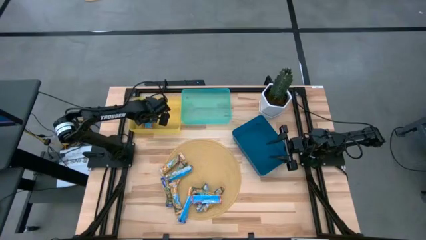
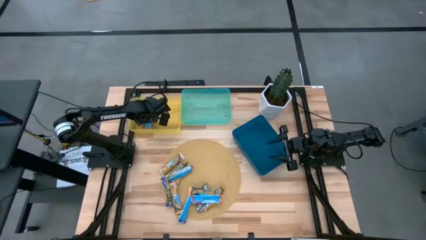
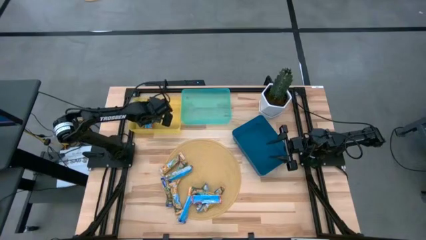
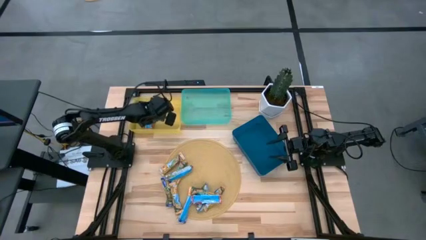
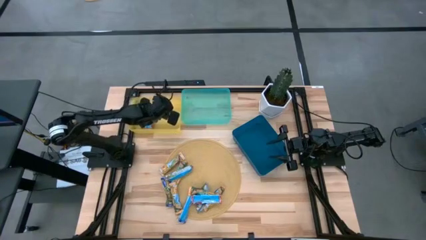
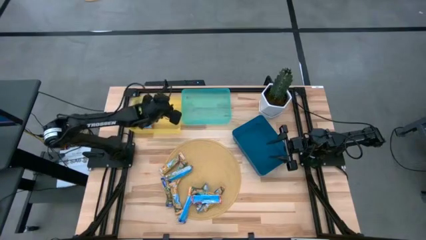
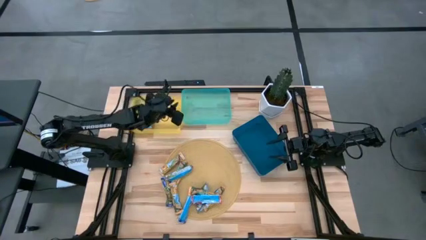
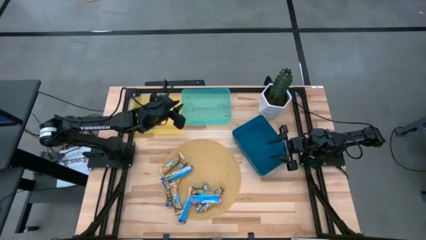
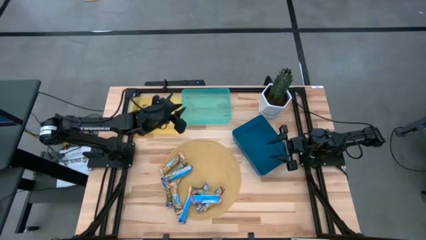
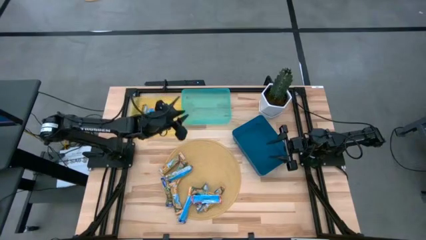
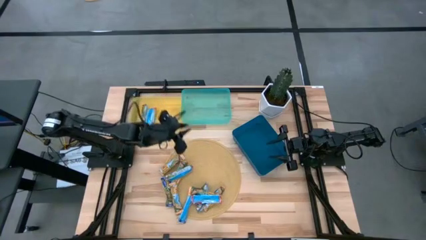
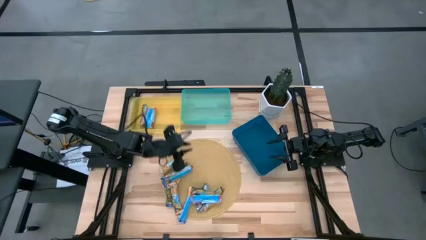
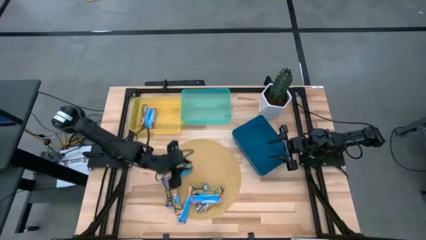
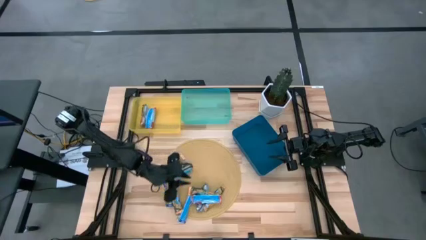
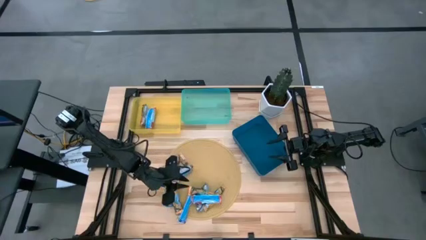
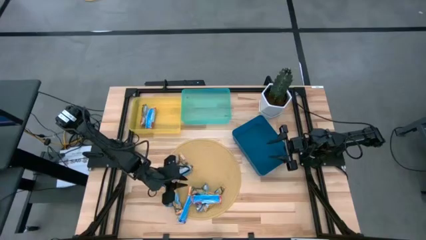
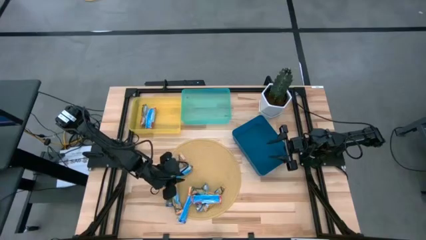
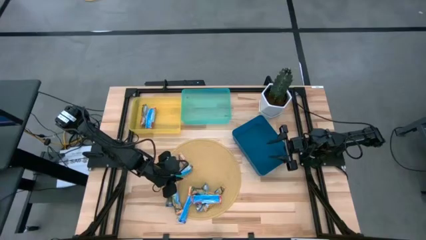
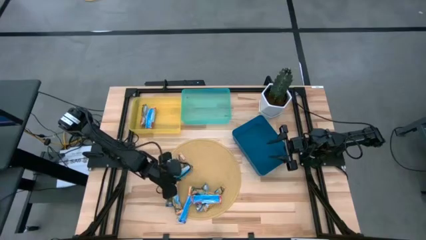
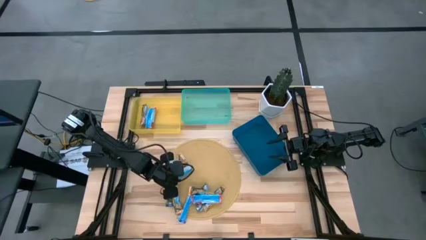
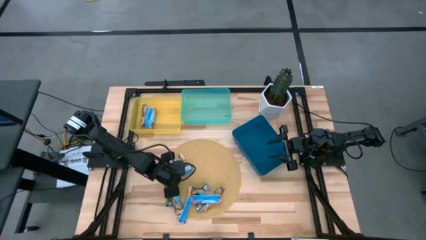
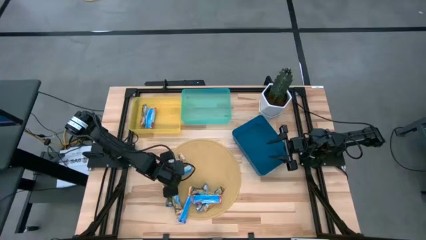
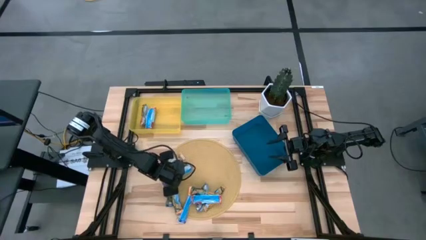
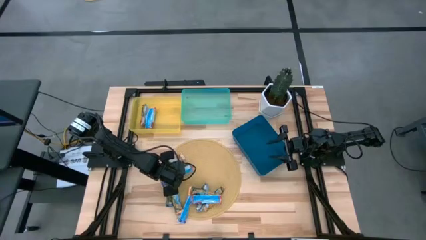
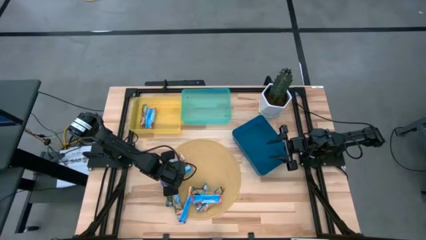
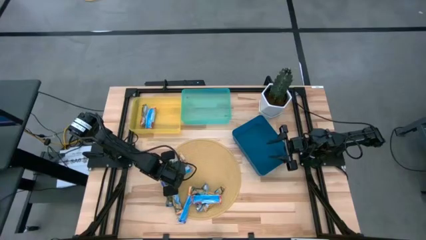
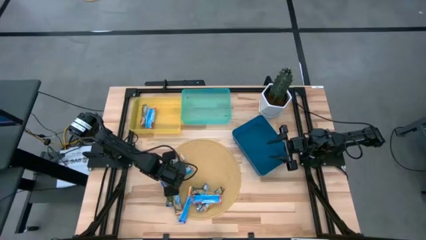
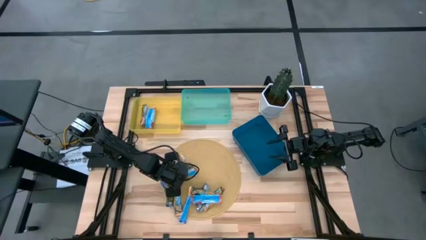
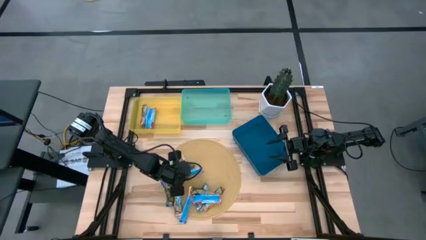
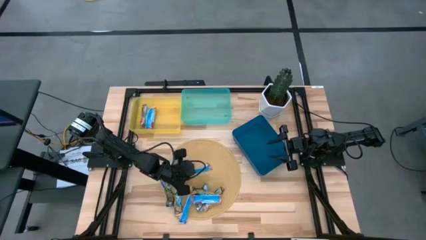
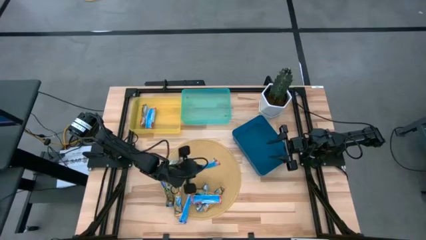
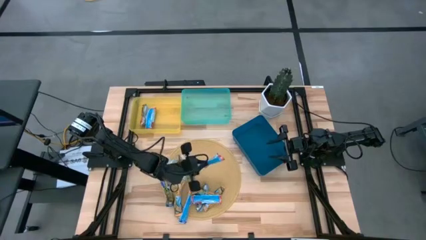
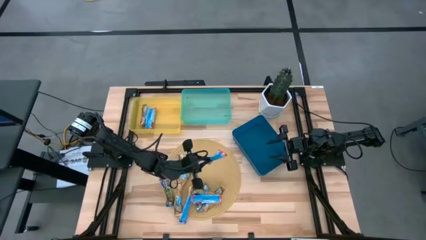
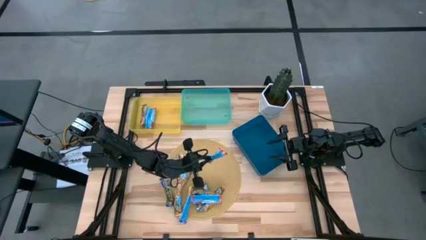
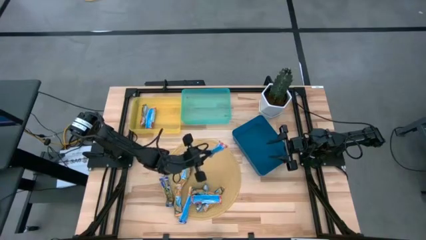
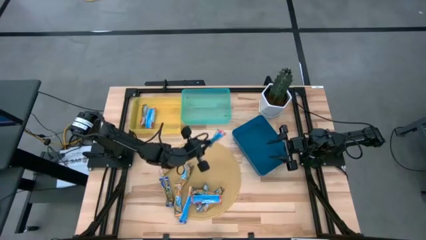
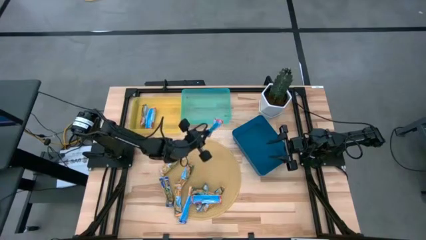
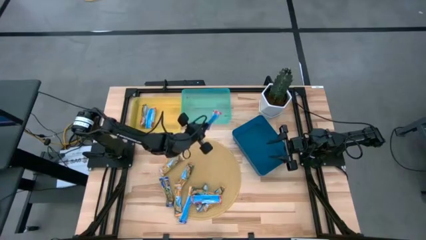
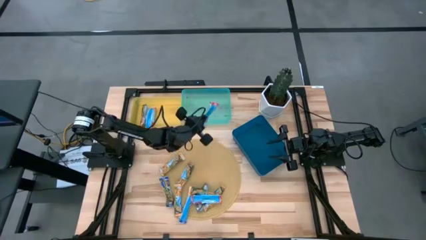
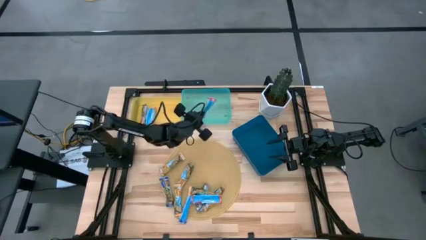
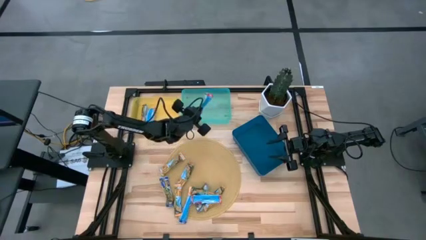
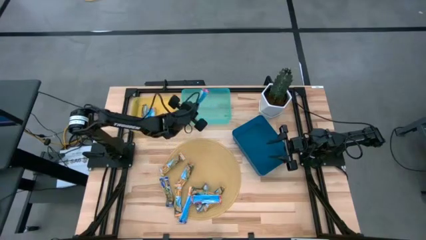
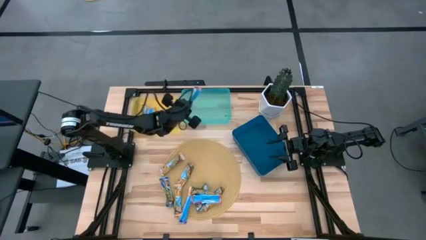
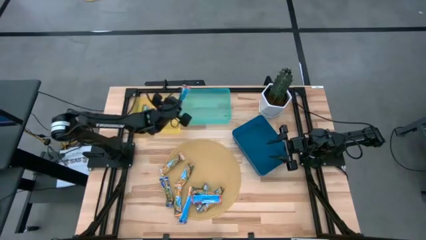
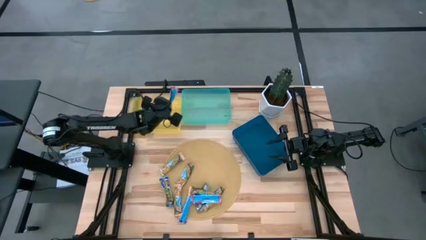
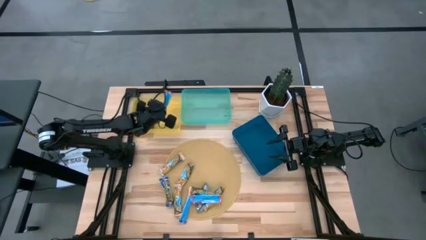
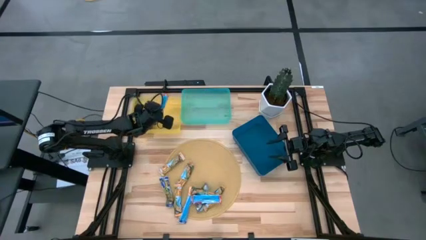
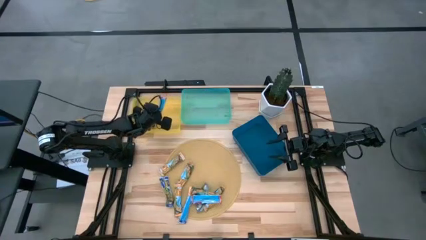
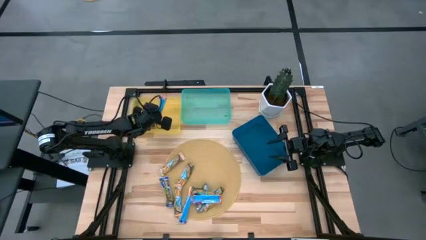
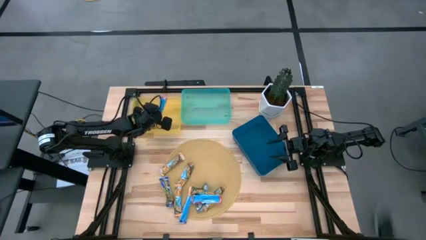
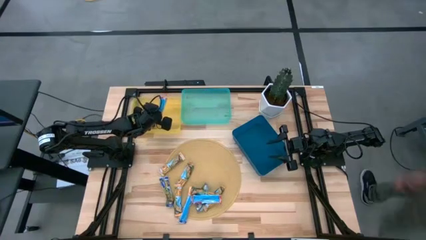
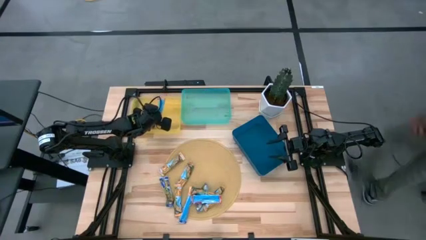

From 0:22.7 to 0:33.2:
Task: Pick and place Granola Bars by type
Put the top red granola bar into the yellow bin

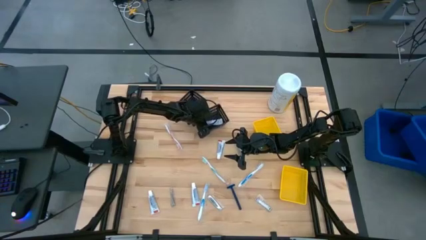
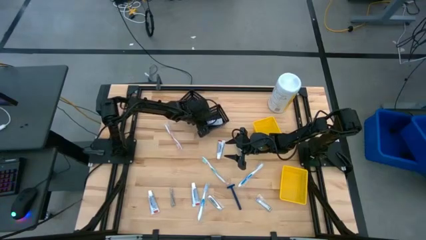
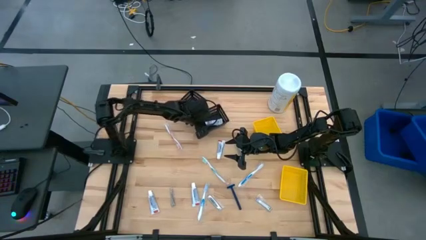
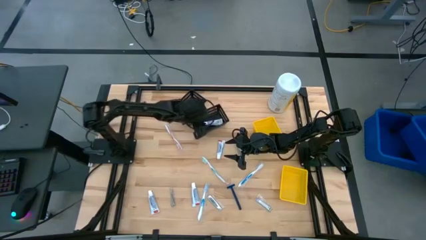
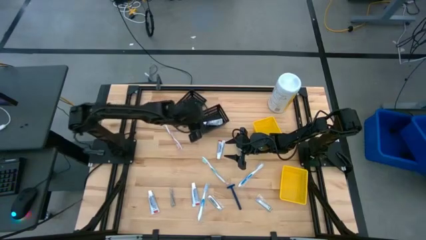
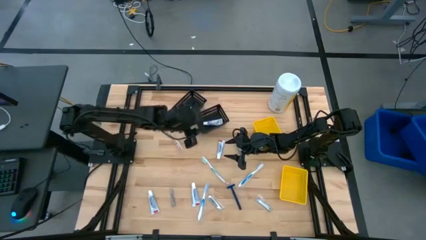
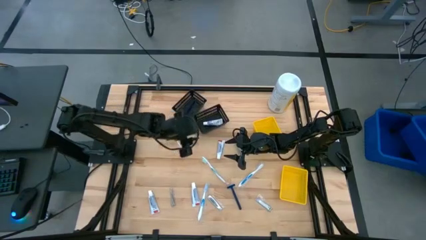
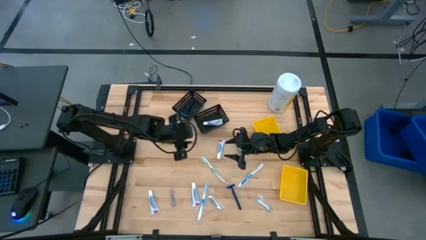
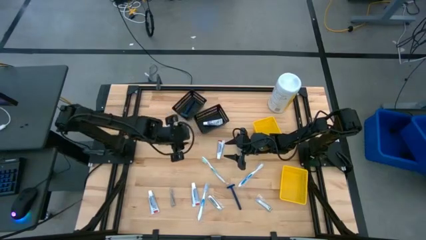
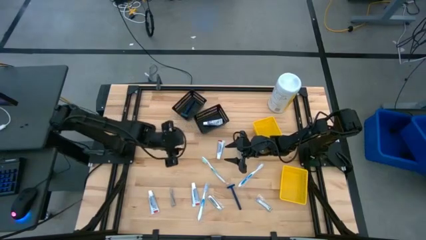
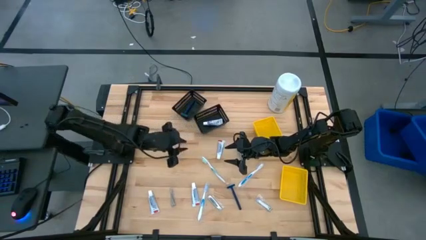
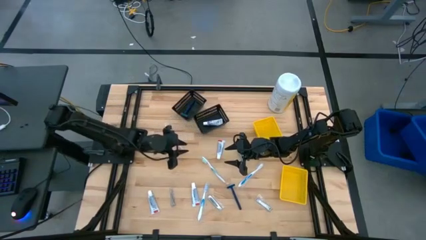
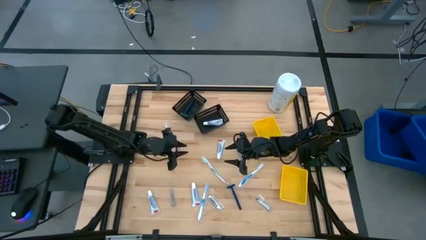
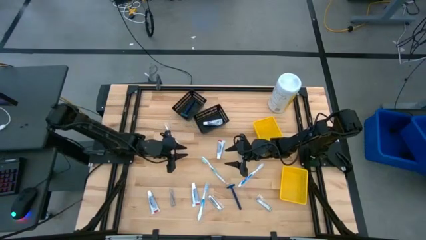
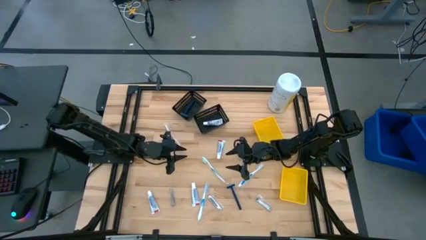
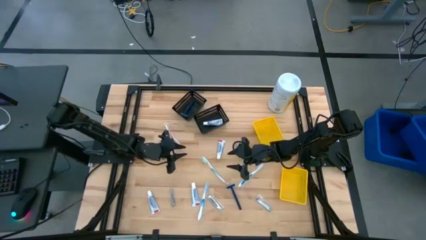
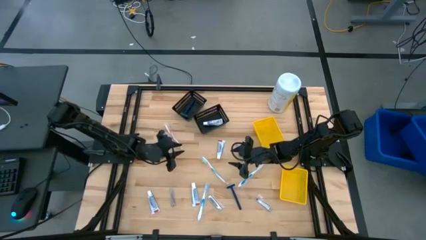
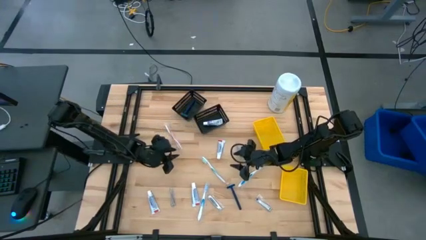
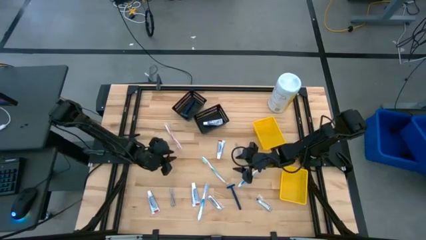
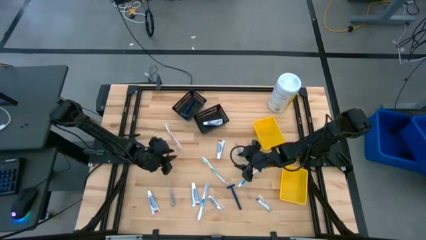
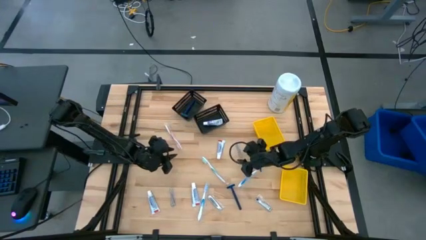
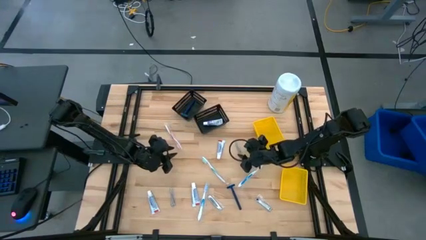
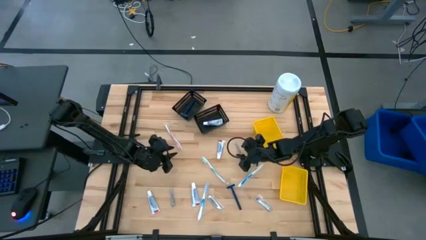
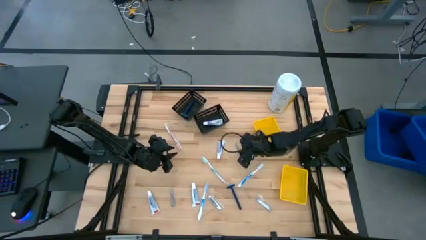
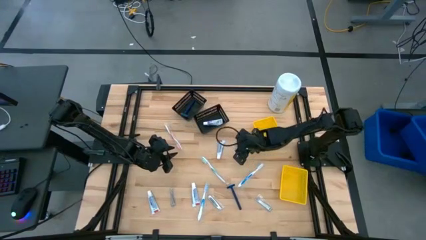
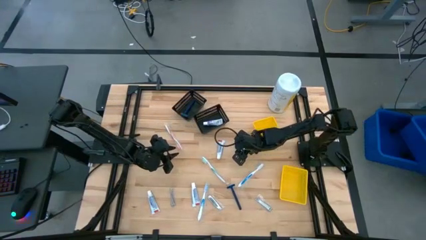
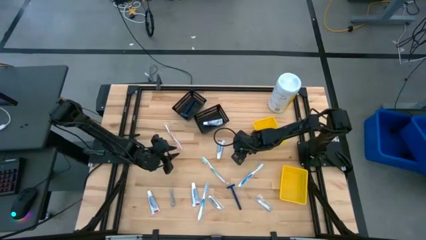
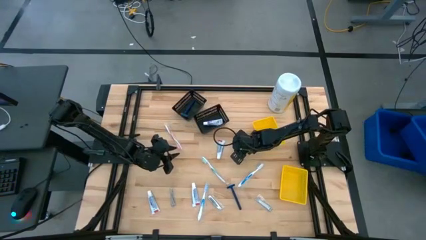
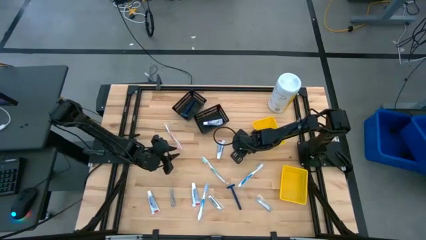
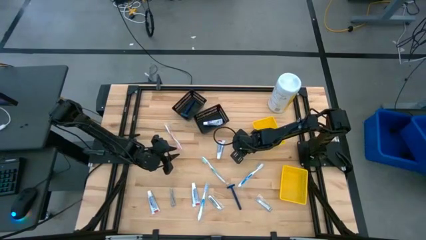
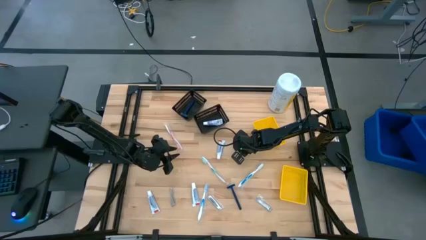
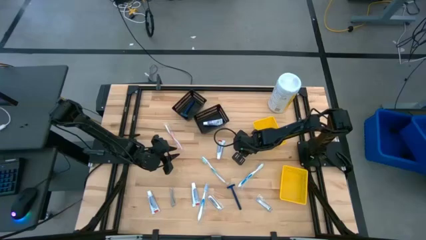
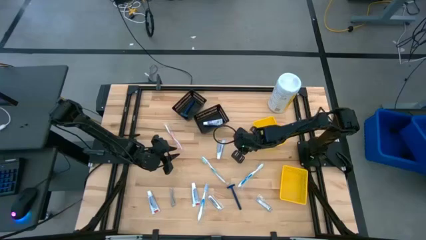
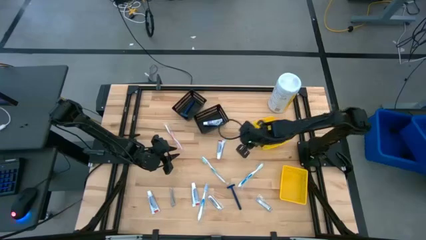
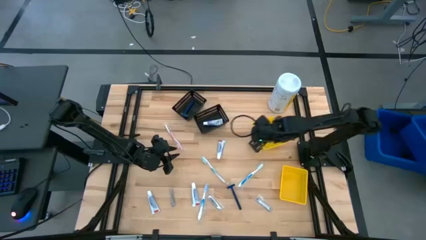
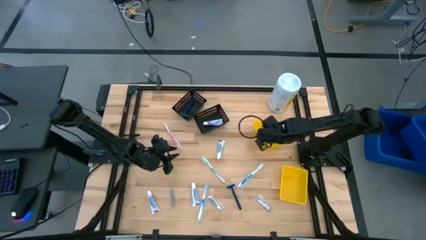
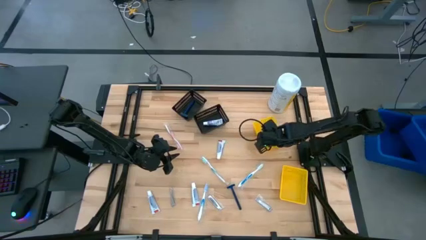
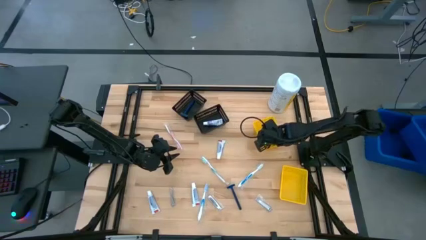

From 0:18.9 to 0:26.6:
Task: Pick & Place Travel size toiletries
Put the nail cutter into the top yellow bin
